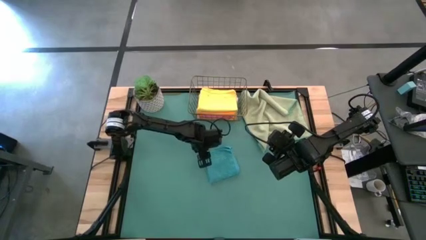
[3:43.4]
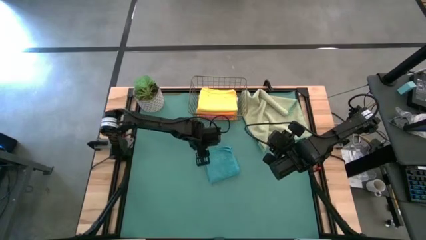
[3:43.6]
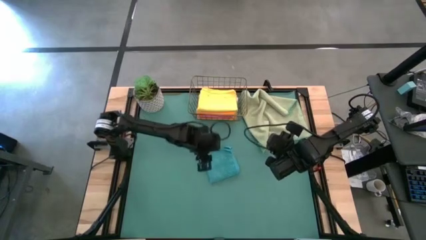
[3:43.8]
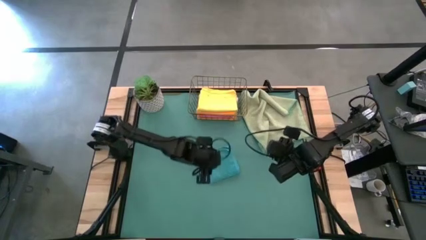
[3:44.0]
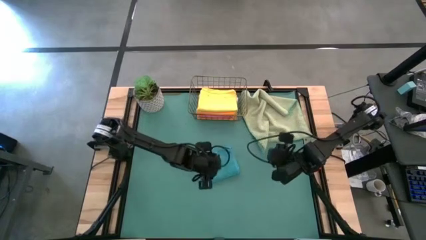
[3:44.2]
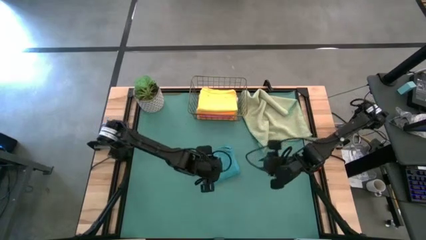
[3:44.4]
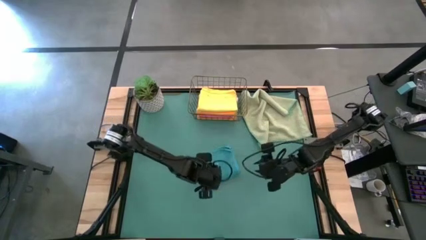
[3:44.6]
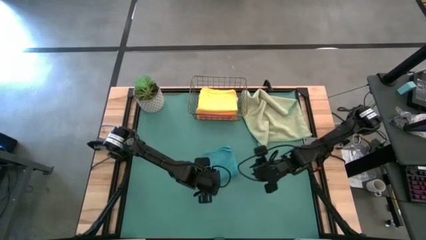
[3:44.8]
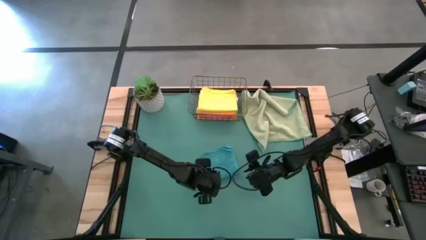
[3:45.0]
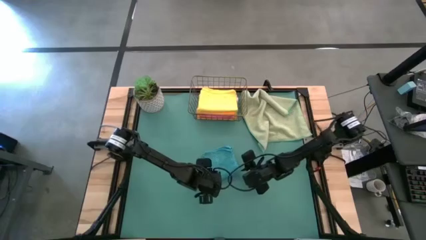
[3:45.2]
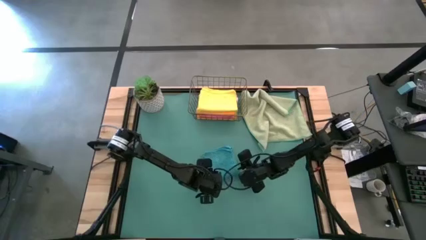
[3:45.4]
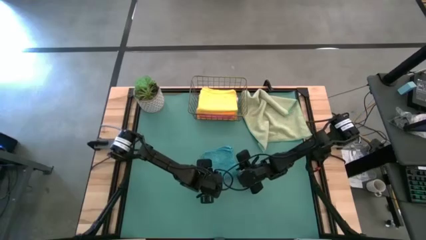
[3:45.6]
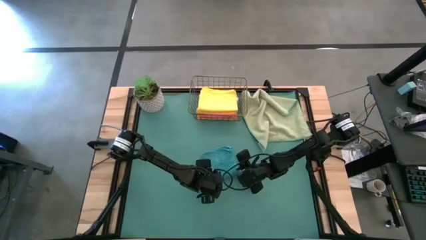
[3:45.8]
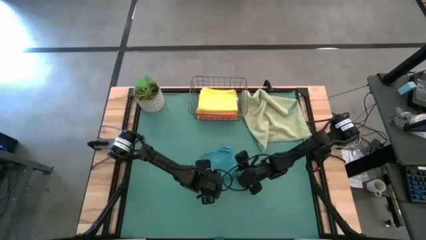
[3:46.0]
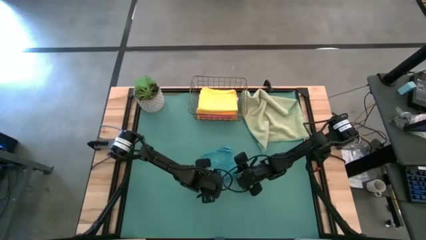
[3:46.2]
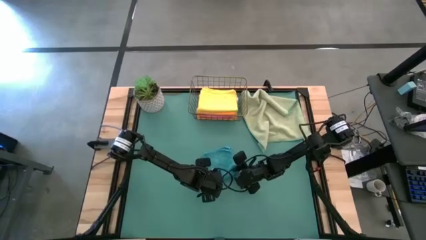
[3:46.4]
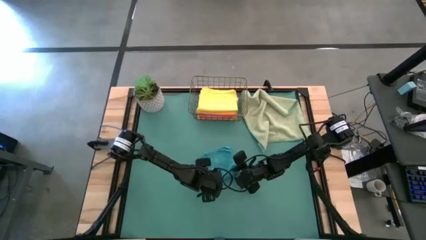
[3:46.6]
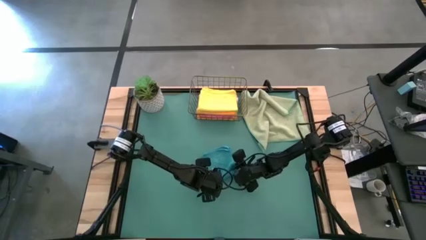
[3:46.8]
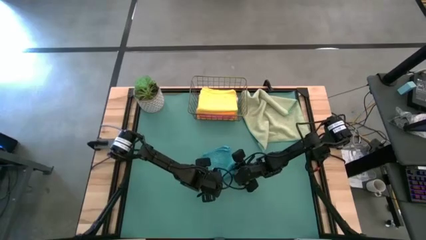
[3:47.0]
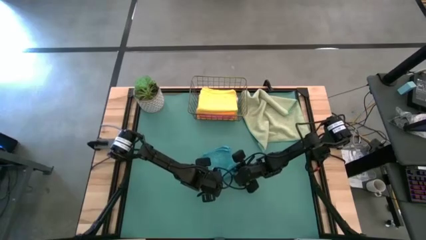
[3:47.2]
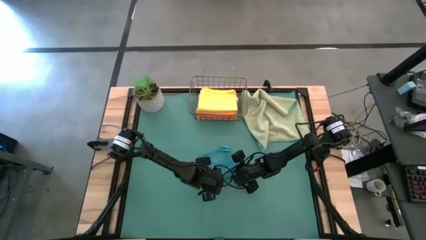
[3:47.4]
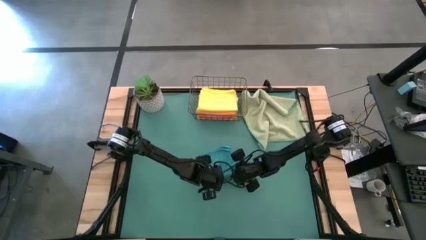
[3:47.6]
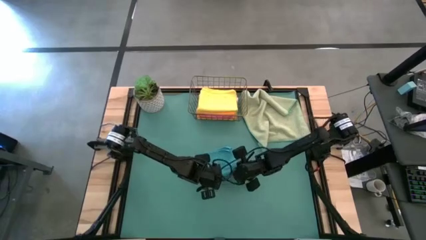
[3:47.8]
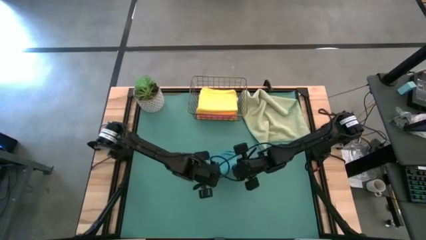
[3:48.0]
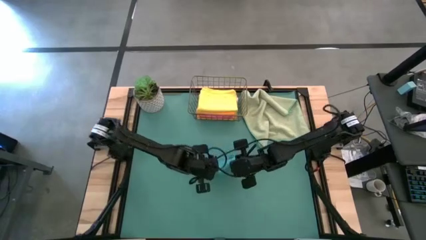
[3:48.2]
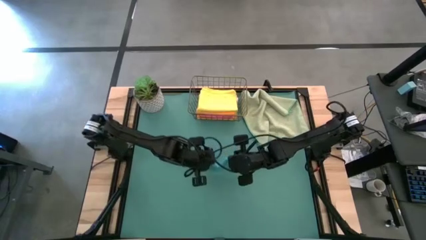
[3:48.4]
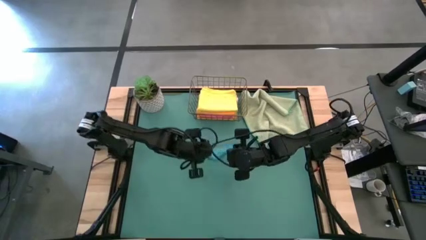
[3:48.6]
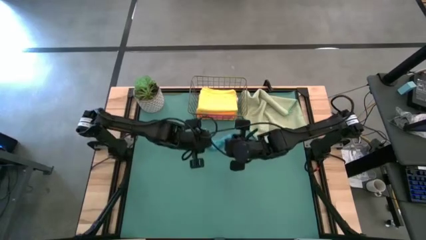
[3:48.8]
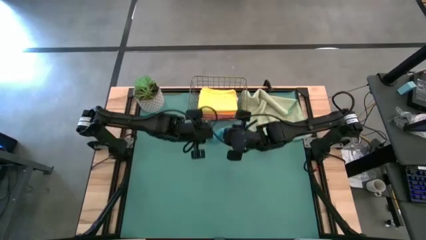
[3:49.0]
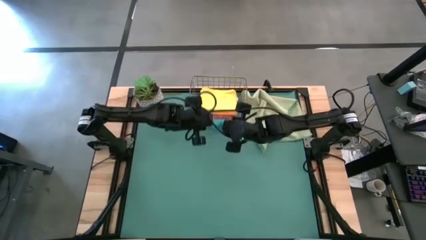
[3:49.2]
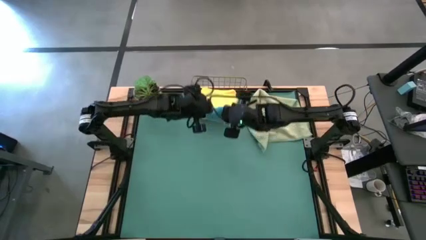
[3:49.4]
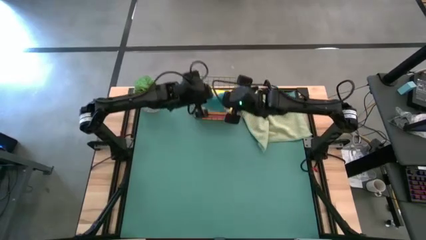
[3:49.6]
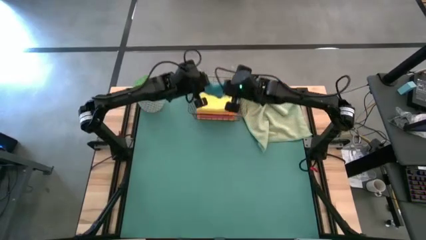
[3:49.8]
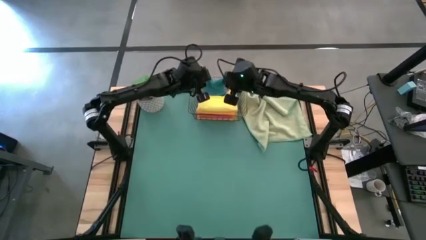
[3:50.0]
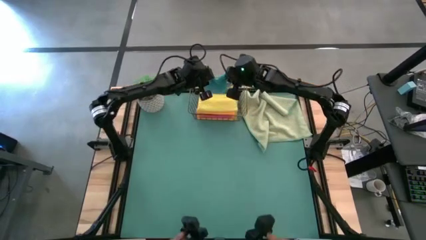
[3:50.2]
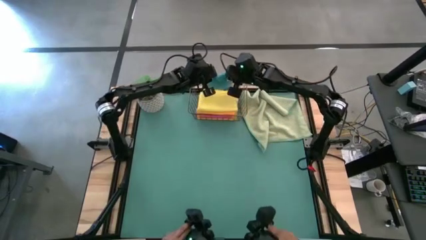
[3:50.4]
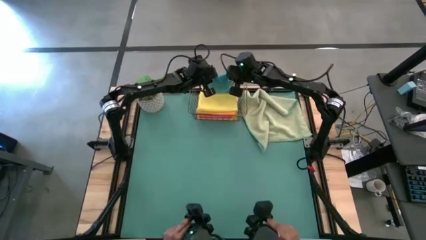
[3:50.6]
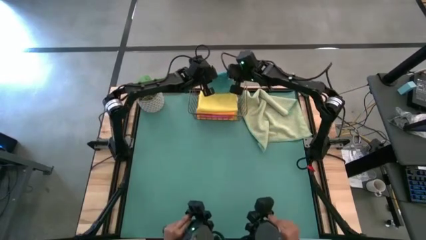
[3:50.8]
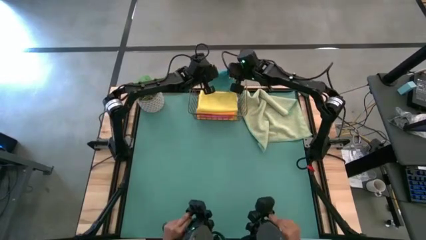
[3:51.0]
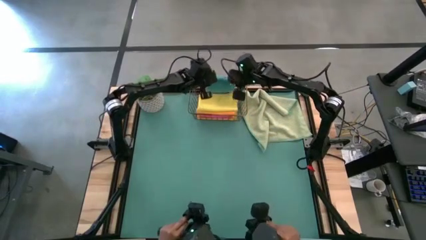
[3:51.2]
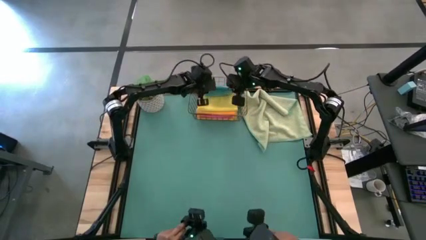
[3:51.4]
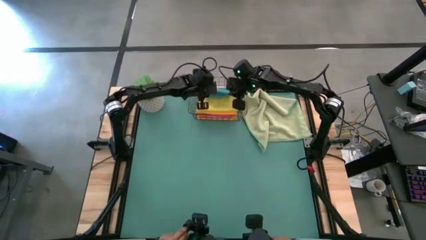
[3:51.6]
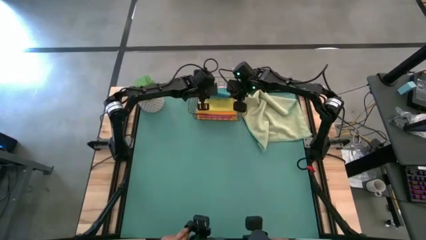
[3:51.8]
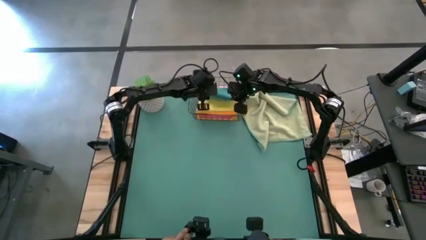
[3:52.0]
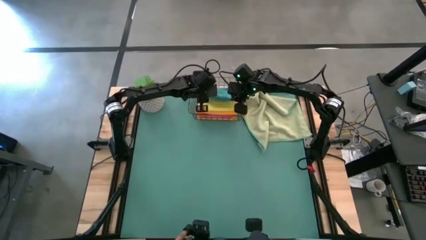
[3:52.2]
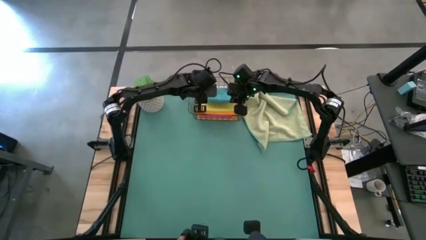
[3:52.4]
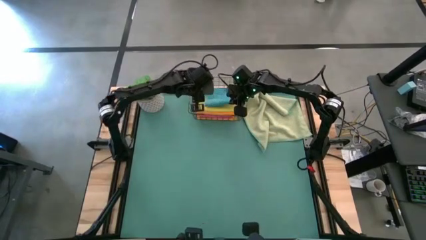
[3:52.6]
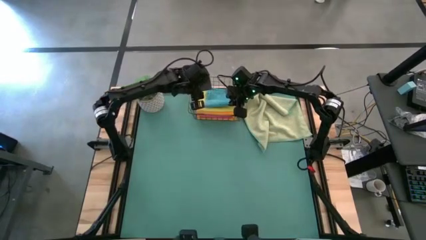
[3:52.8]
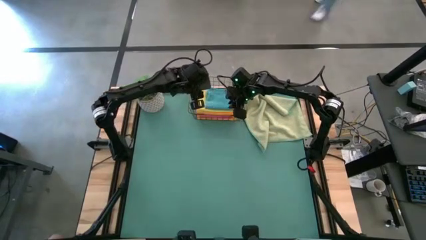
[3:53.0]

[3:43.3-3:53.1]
Task: Fold microfiber towels
Put the folded blue microfiber towel into the wire basket

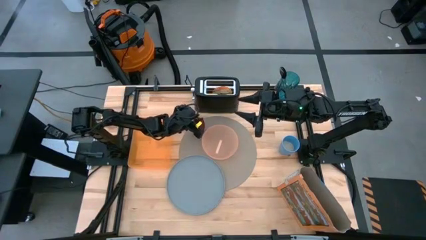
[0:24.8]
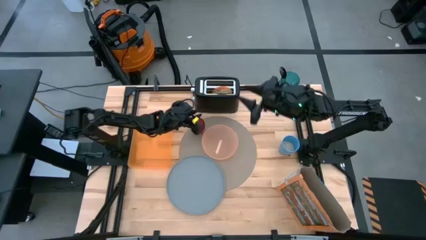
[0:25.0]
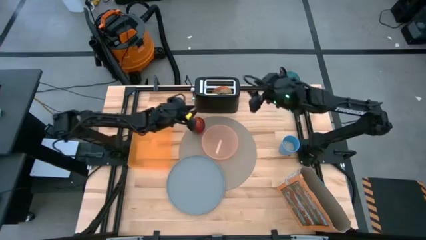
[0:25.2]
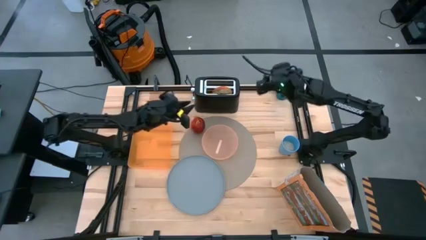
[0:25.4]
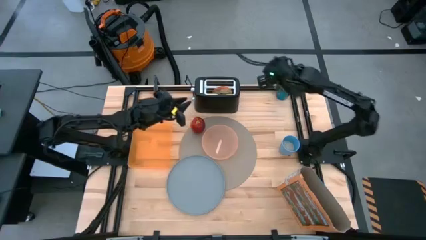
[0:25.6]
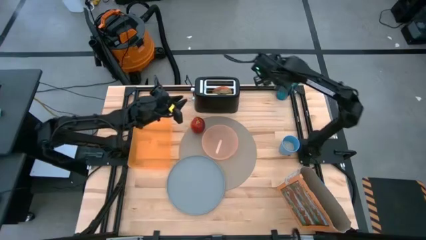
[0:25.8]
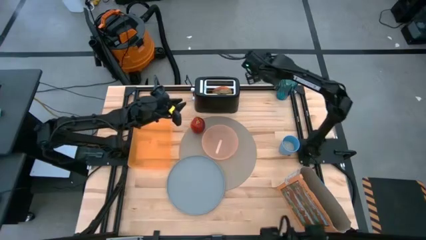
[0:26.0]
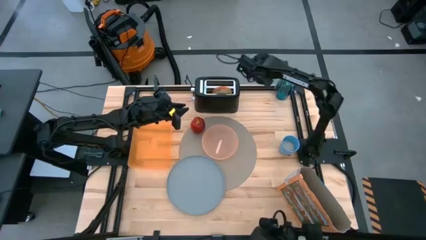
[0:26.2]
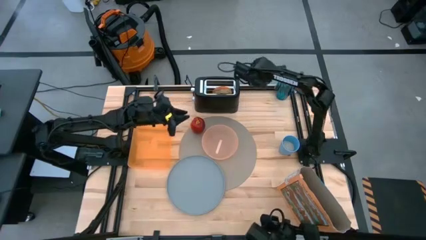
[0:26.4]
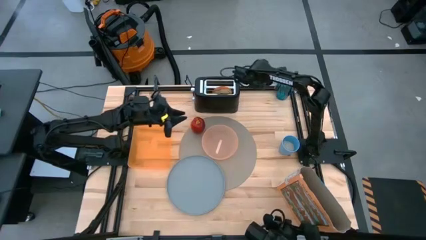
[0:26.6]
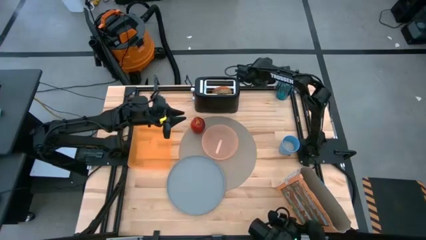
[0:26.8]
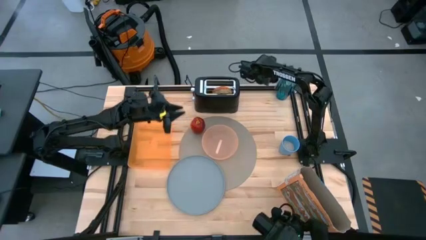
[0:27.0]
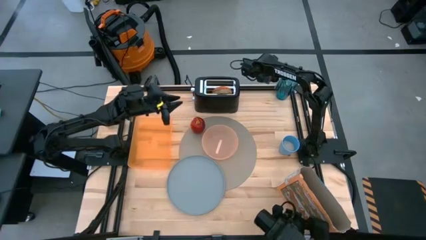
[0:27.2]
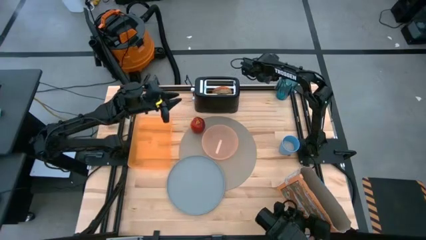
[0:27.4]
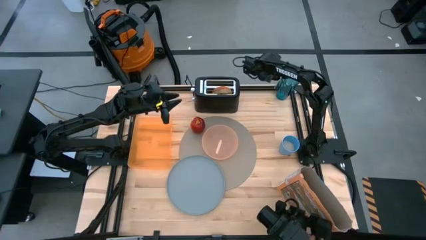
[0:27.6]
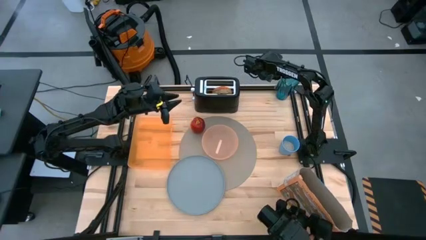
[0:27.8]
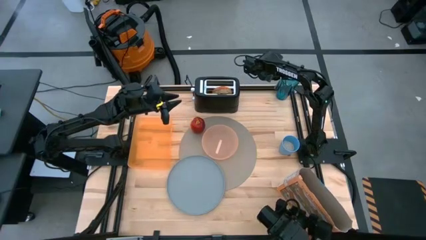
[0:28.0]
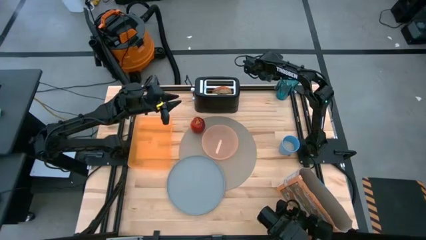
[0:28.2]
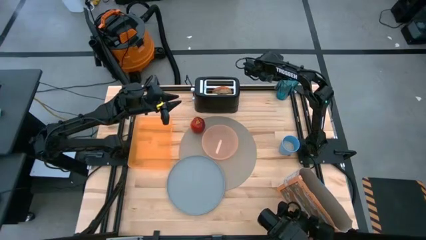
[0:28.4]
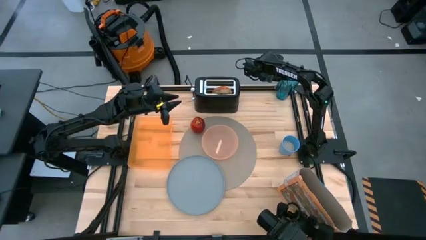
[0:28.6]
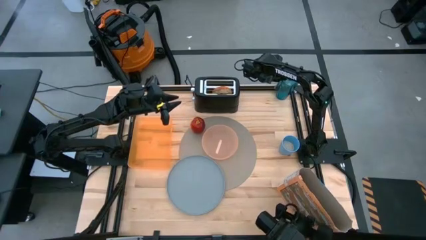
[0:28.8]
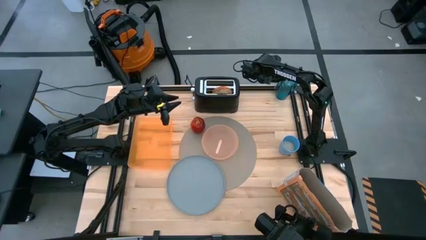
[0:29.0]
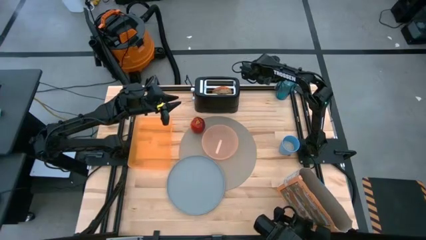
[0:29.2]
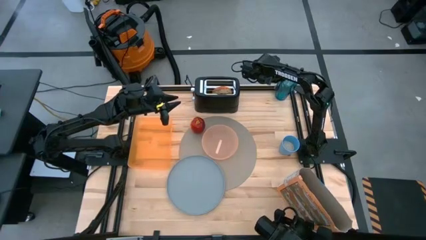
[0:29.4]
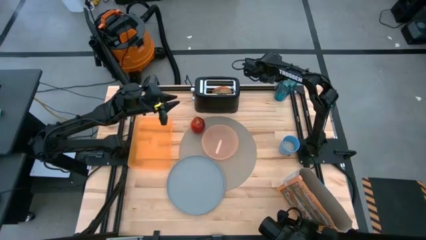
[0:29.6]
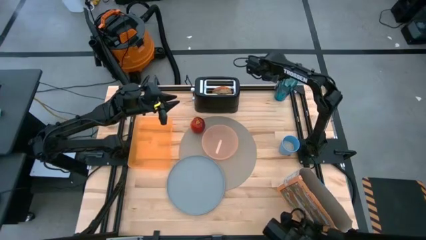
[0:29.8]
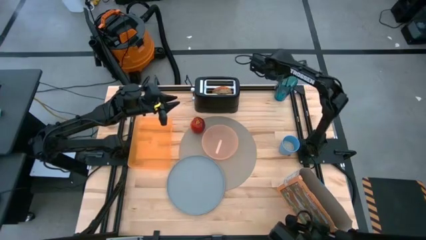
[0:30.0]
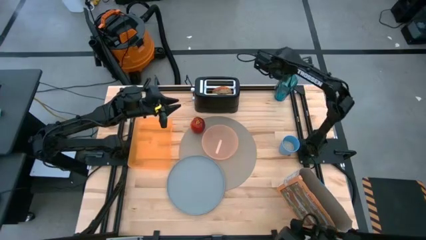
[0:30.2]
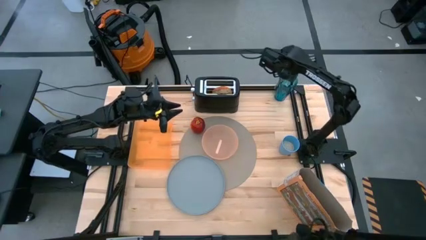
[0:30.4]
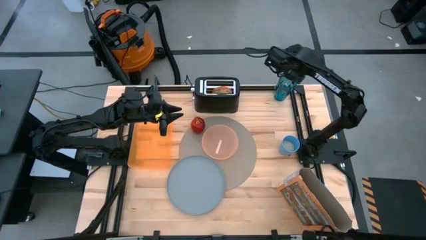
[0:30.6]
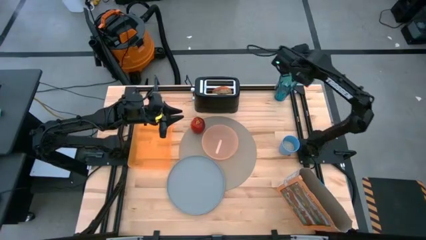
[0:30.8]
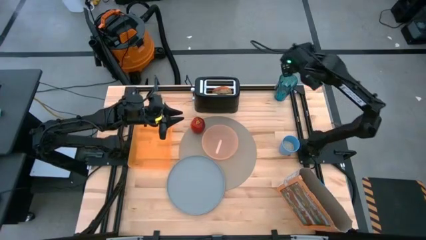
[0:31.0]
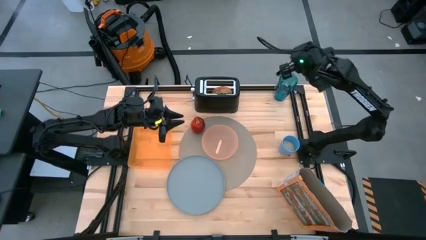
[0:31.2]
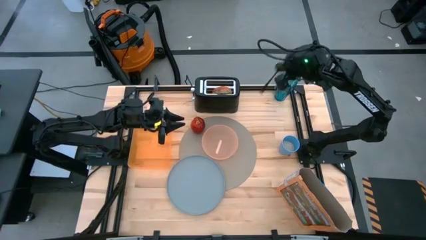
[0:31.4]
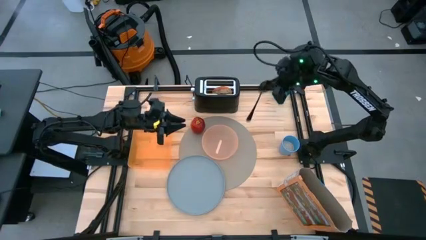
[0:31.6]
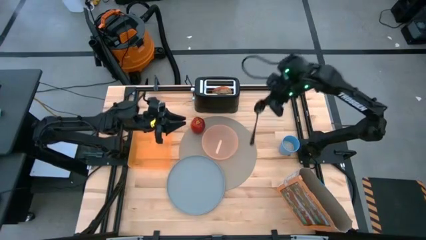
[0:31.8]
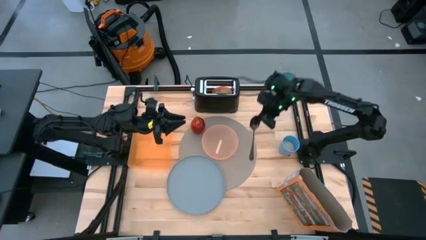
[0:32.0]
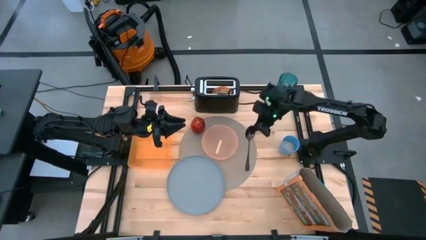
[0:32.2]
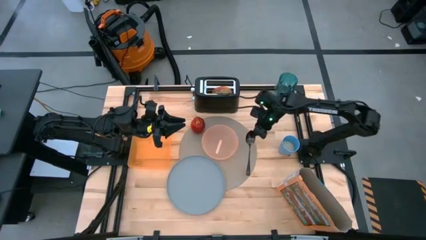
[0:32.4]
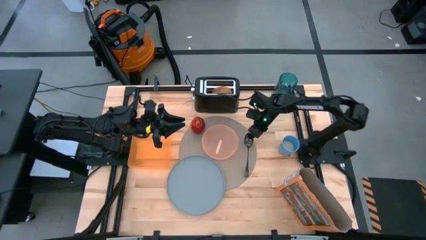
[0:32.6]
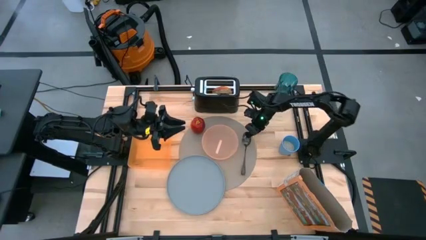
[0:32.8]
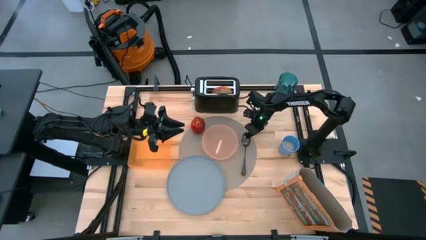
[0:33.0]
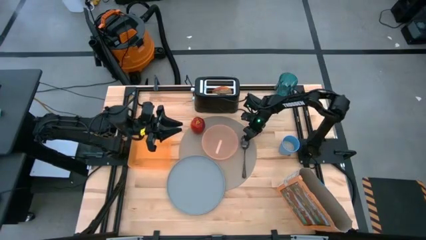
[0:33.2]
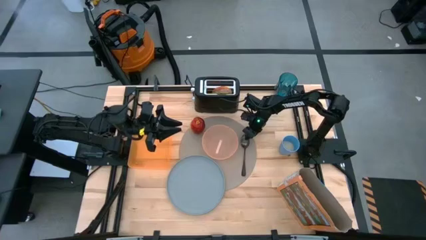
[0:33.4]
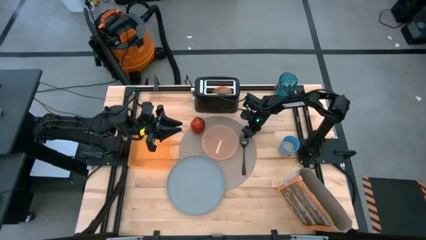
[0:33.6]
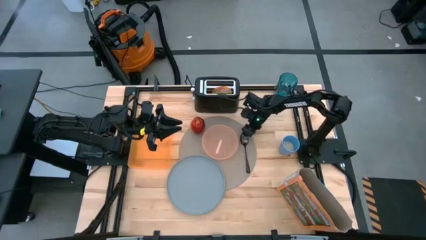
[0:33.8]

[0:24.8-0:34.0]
Task: Arrange a breakfast setting
Put the black spoon to the right of the orange bowl on the gray table mat
